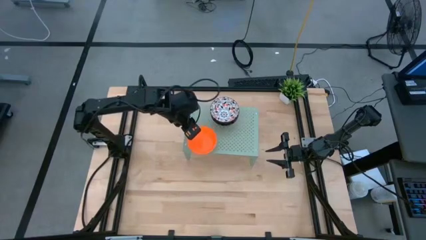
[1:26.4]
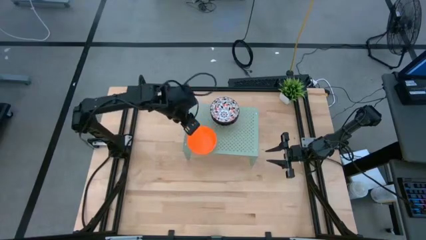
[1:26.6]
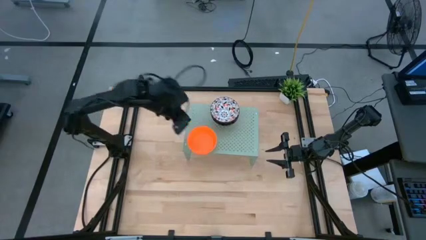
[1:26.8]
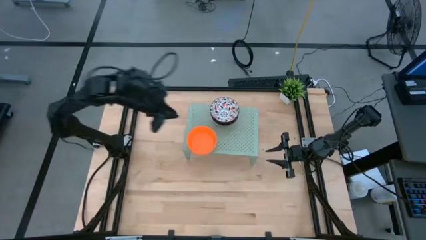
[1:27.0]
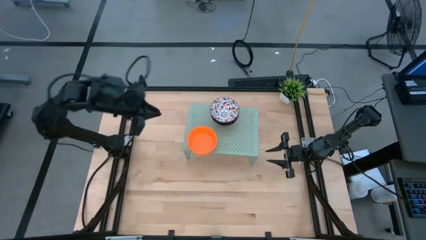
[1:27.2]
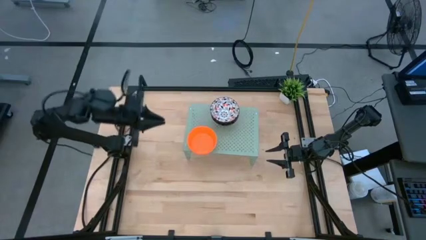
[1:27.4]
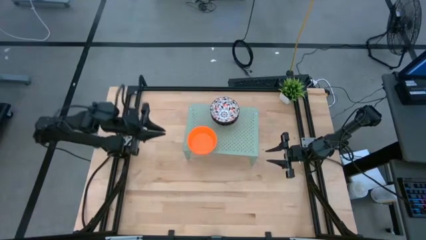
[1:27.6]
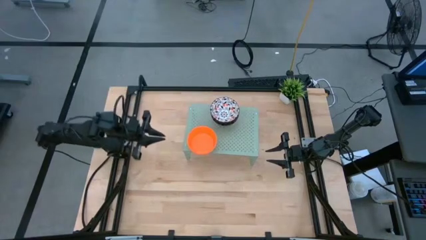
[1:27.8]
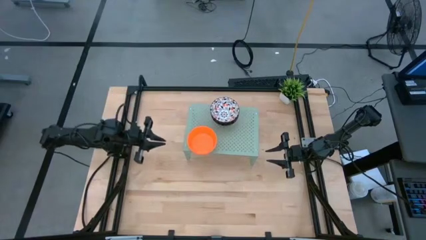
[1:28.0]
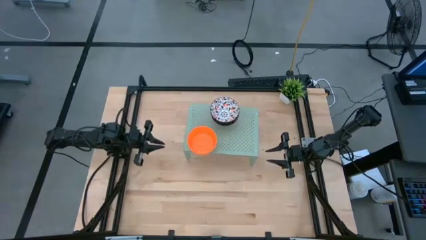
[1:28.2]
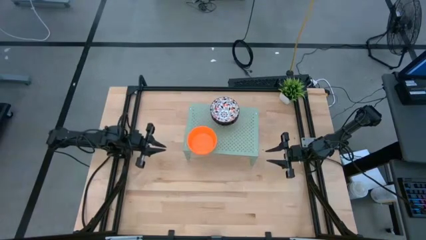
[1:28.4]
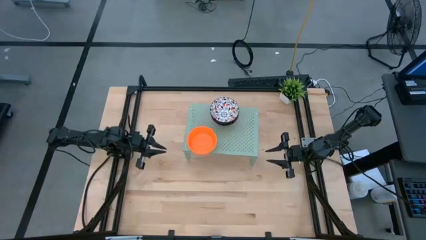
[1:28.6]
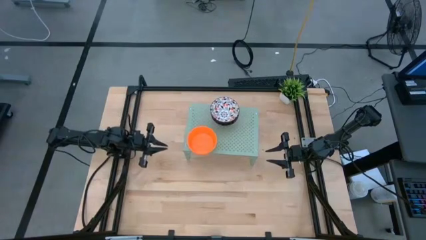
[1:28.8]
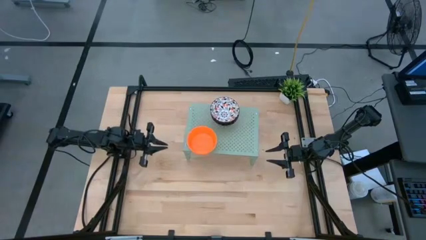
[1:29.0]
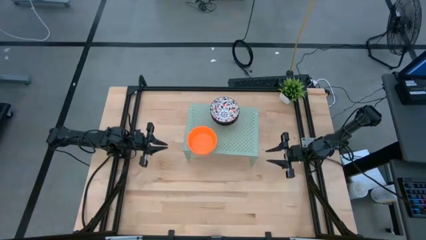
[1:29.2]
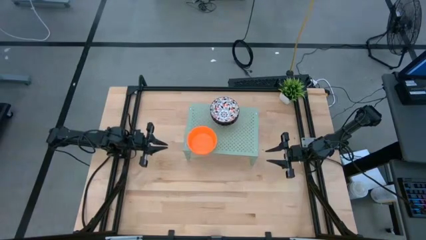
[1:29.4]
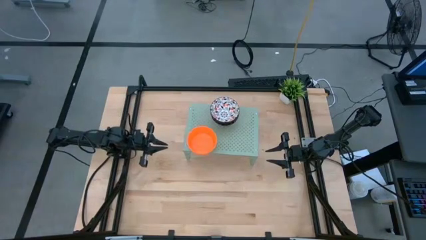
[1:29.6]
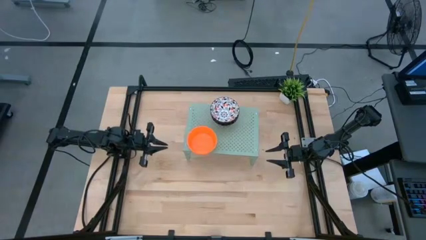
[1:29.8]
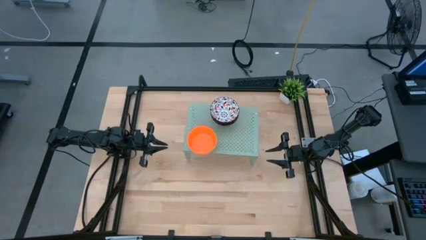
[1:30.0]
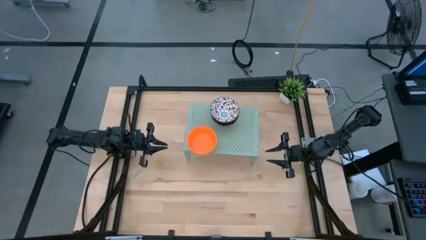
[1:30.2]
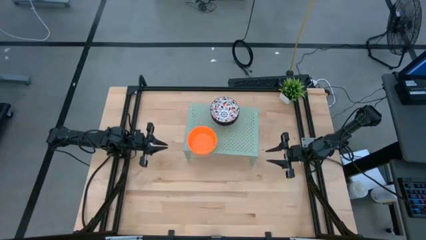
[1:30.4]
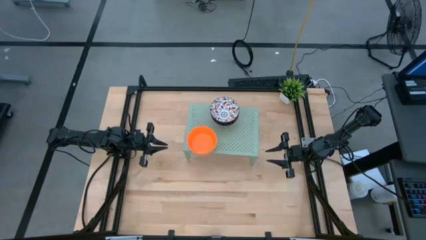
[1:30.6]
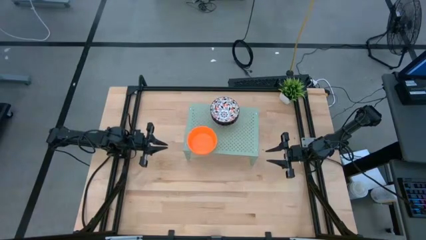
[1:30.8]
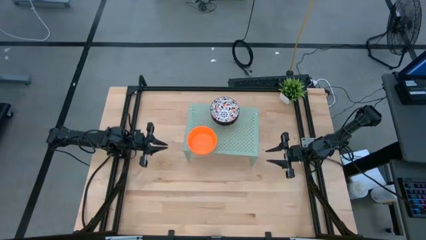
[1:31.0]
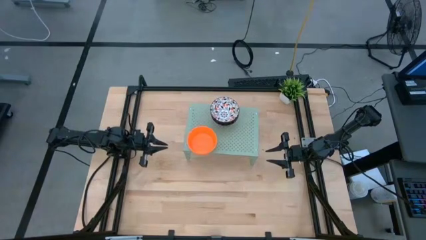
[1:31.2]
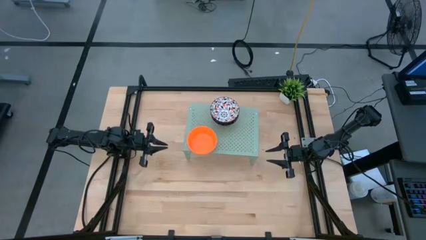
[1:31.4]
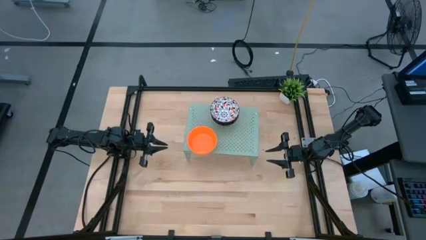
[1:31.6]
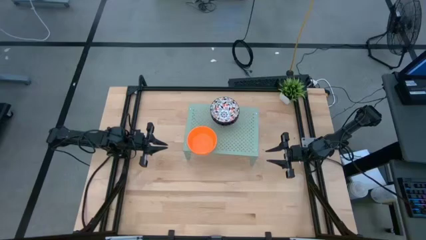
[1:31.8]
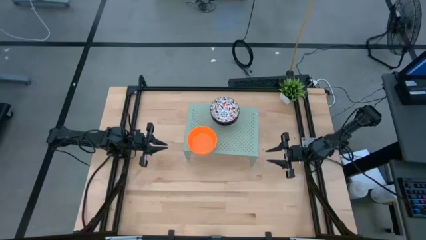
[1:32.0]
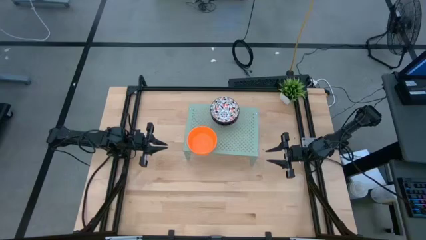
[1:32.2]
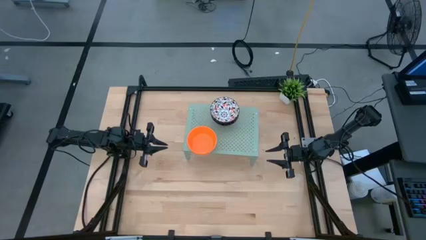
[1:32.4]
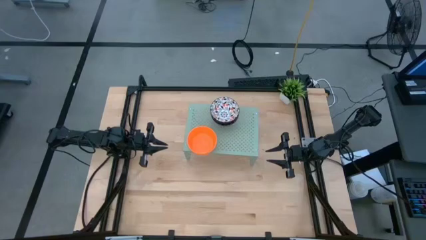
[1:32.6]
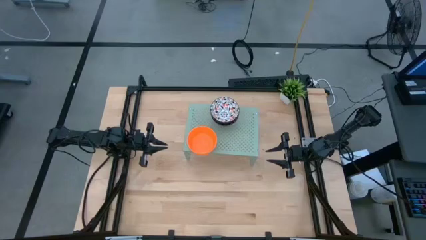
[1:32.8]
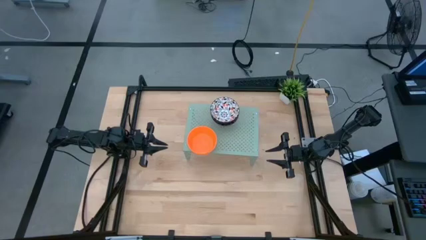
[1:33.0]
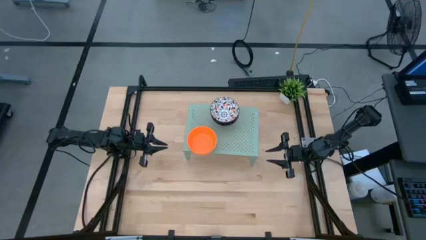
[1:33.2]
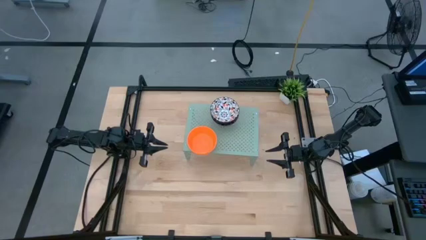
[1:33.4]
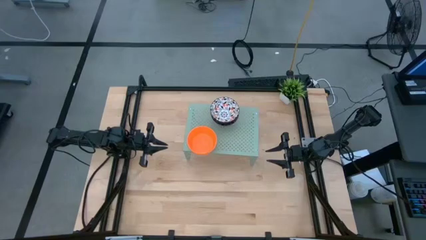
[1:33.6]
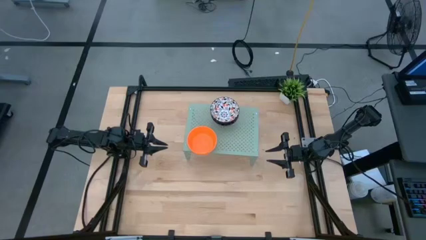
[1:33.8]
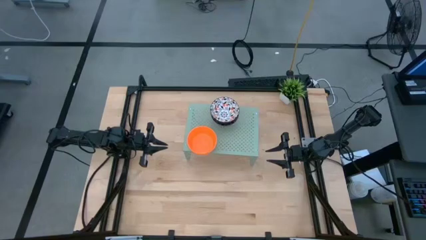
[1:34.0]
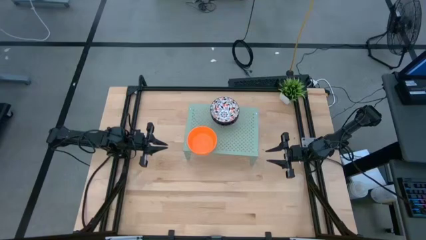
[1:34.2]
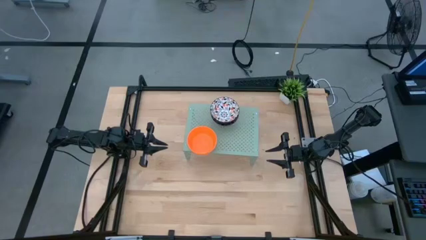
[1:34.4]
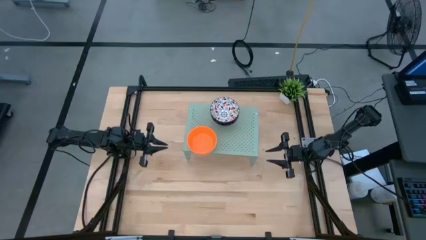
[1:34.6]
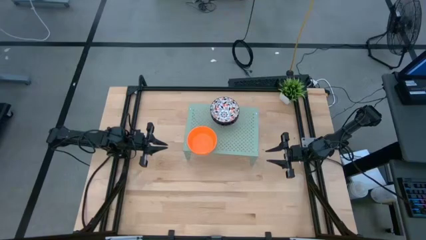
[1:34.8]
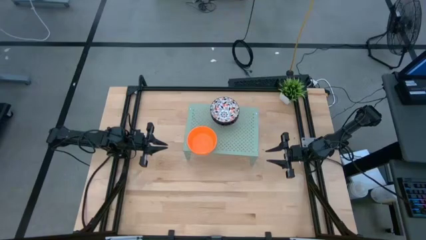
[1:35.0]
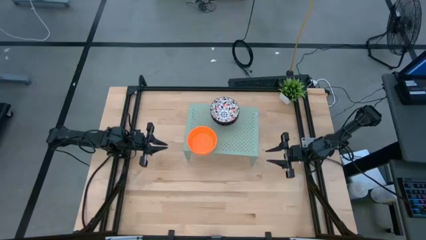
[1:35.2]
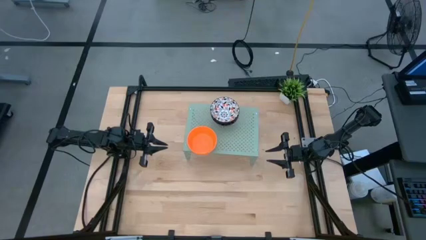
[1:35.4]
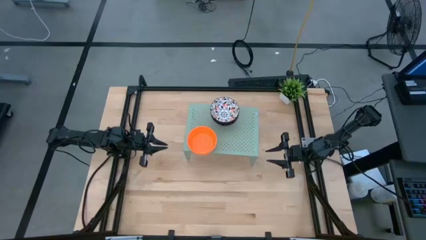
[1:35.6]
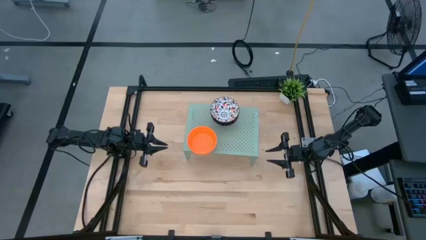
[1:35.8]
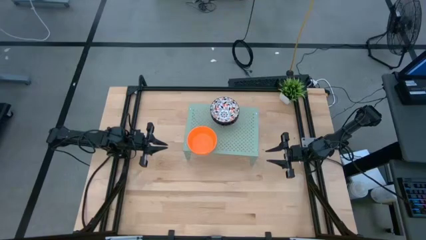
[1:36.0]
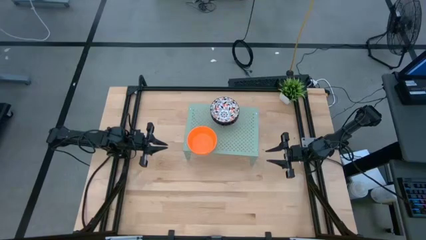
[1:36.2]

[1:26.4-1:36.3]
Task: Pick & Place Mini bowls
Return to Home Position
